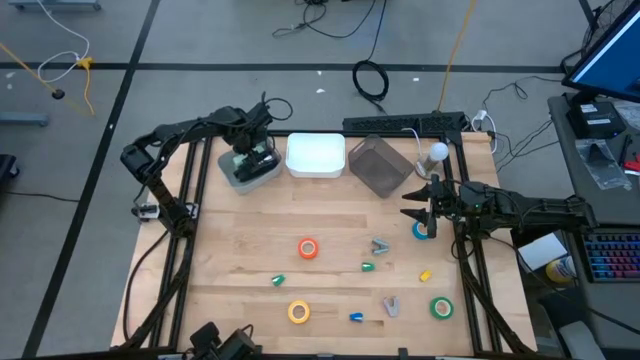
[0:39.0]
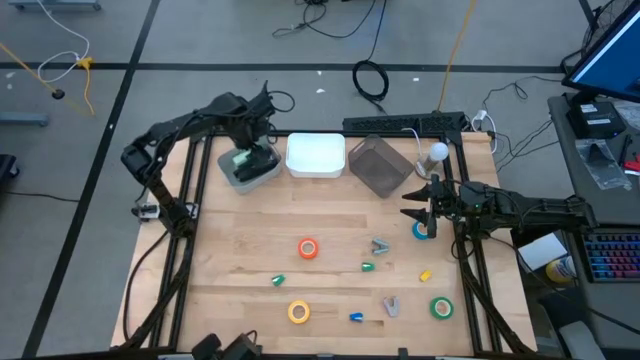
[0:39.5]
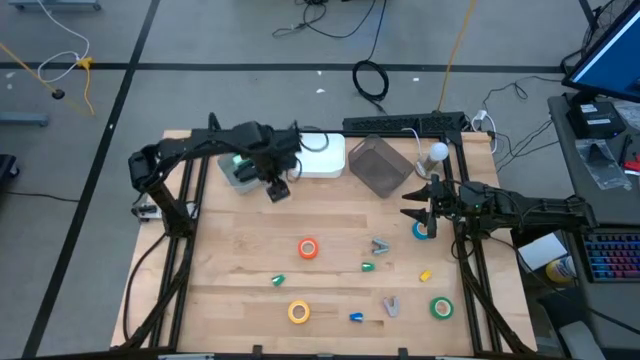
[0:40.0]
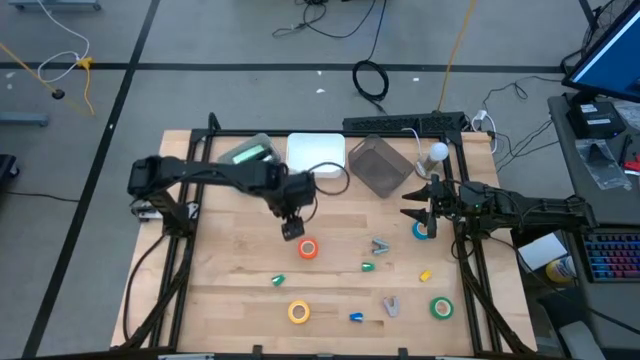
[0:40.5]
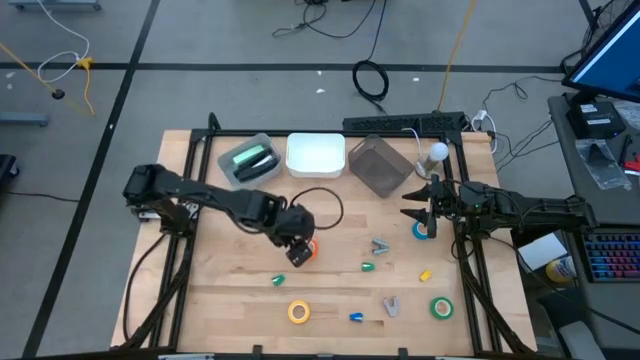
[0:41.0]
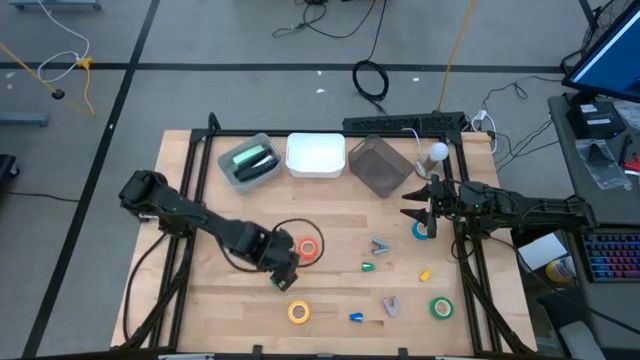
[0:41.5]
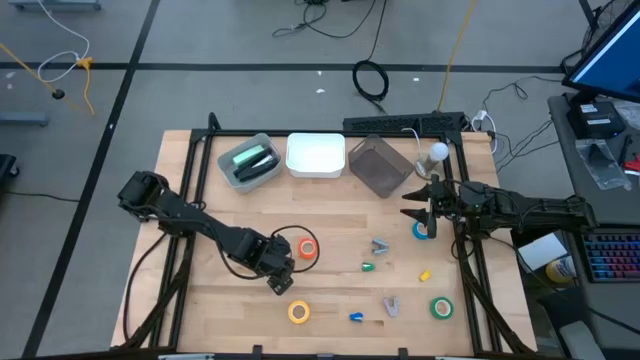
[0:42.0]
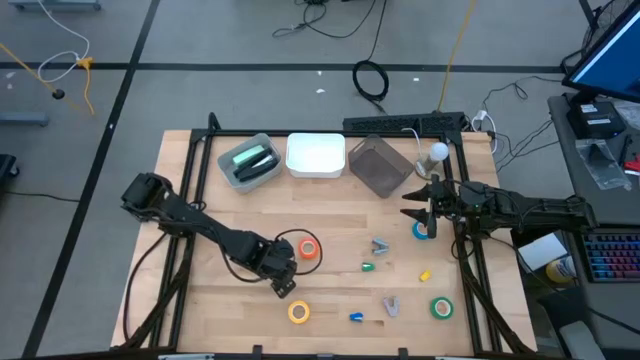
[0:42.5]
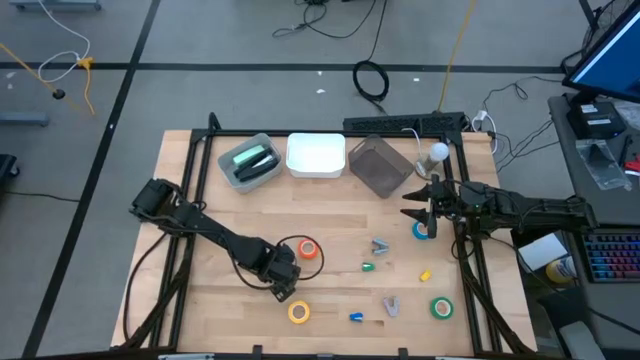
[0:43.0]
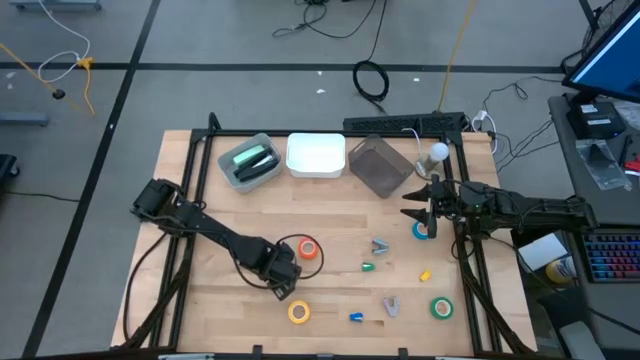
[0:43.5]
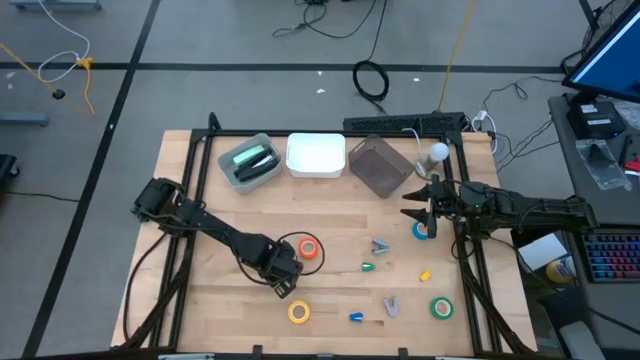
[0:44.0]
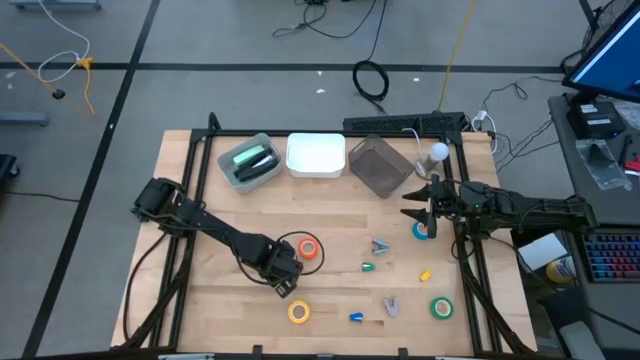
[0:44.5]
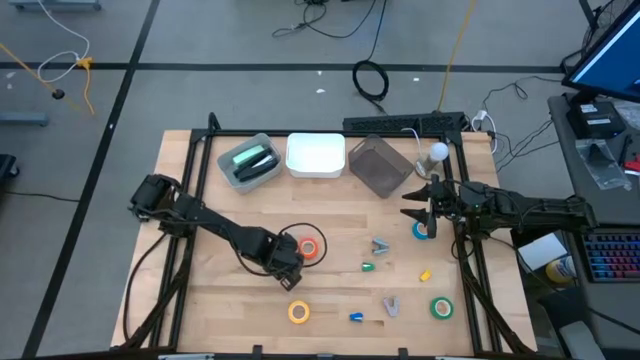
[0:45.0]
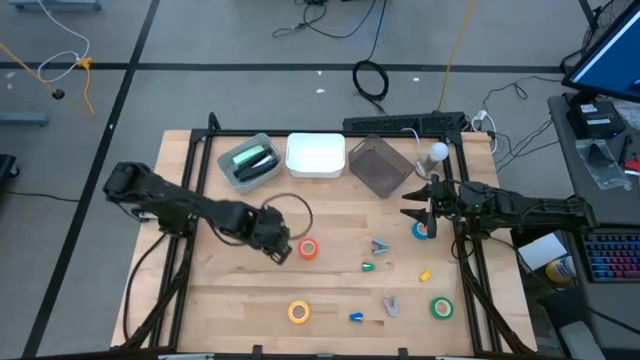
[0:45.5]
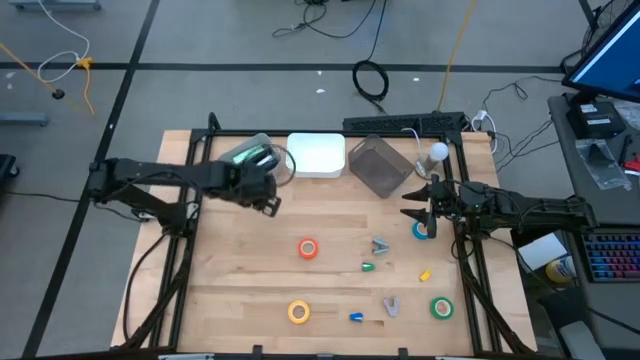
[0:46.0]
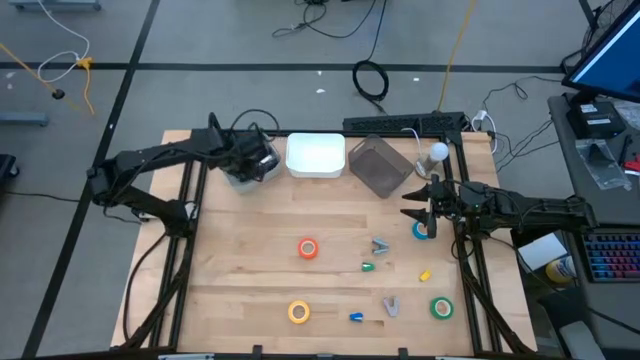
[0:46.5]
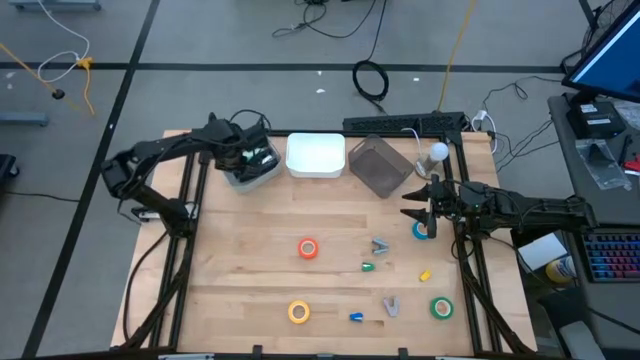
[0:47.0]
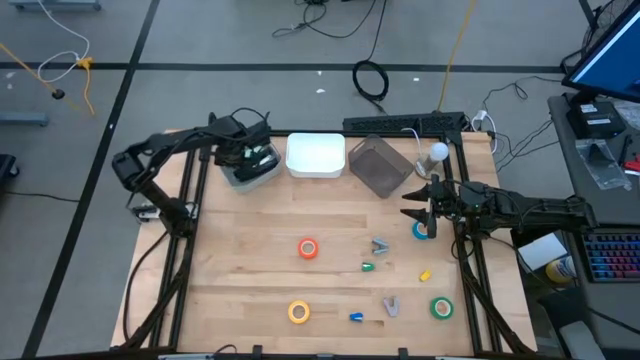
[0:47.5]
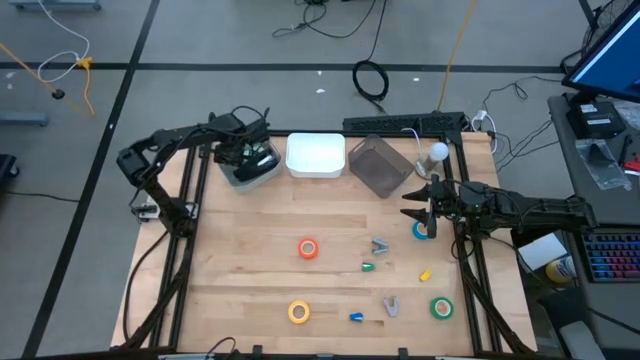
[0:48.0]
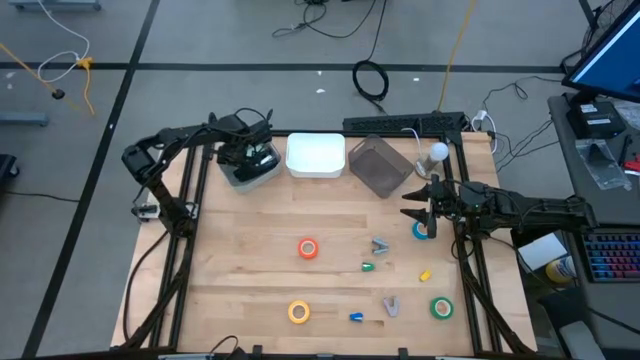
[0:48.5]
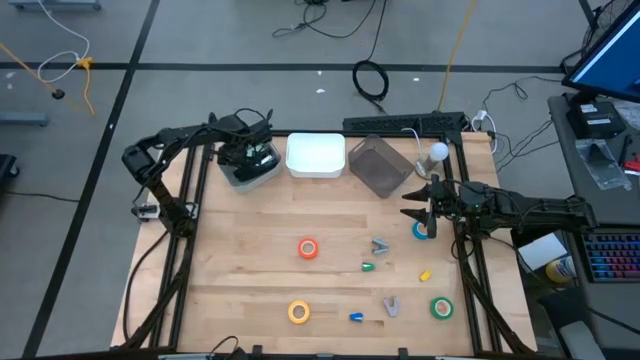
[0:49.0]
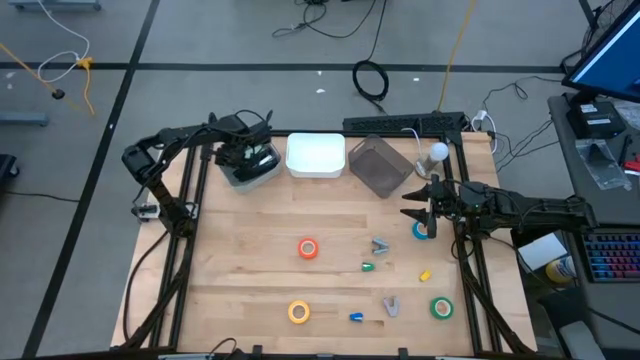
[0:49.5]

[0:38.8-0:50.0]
Task: Pick and place Stapler, Stapler remover, tape
Put the left green stapler into the gray bin

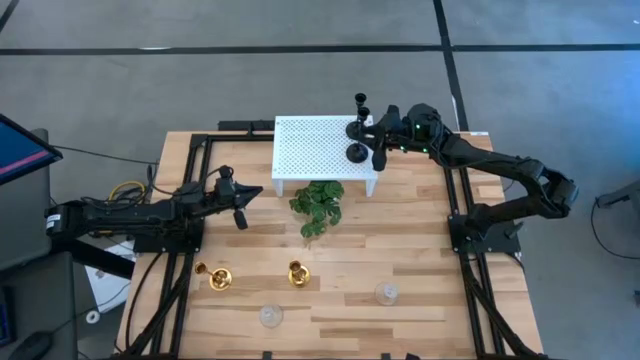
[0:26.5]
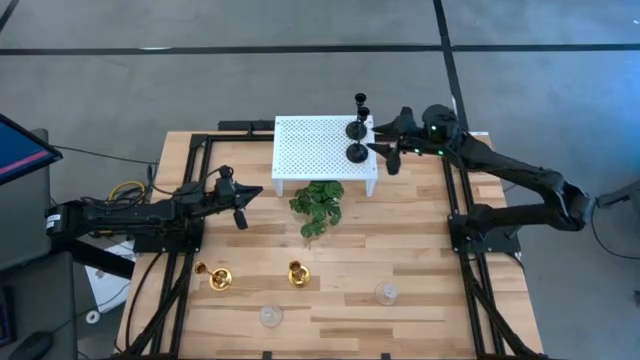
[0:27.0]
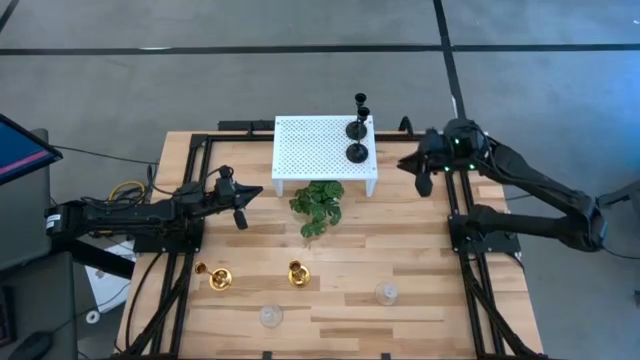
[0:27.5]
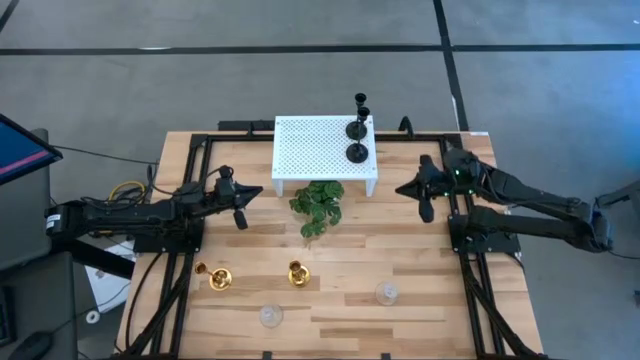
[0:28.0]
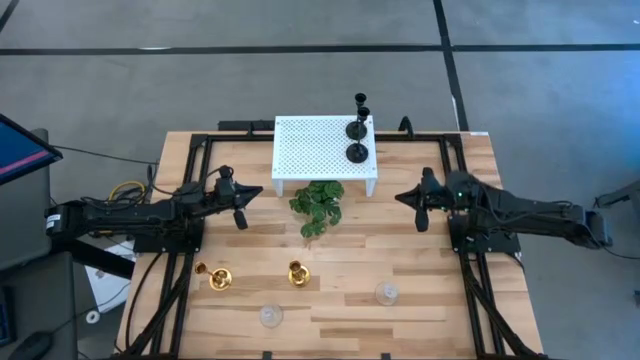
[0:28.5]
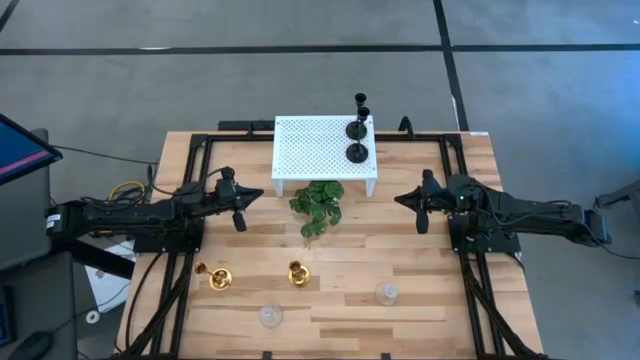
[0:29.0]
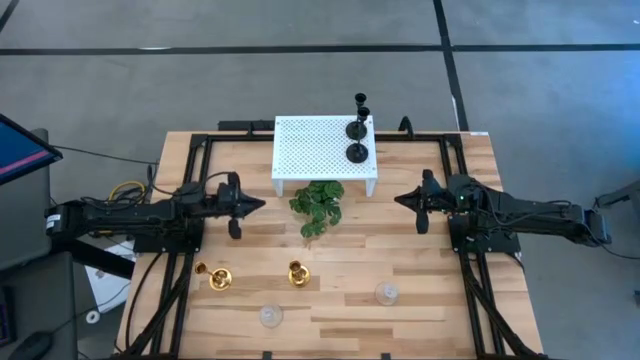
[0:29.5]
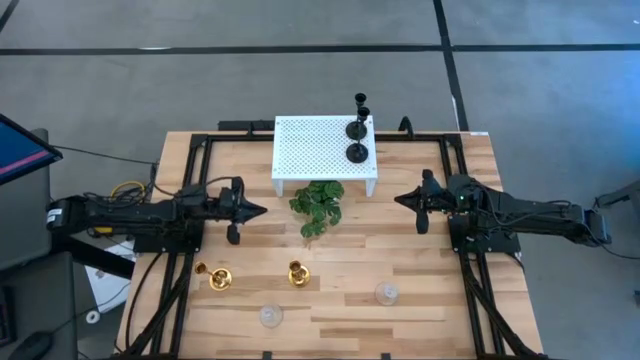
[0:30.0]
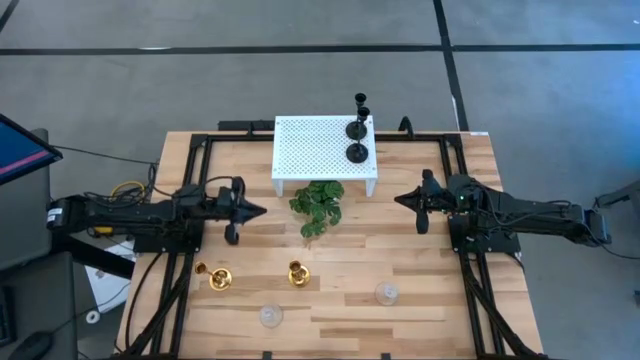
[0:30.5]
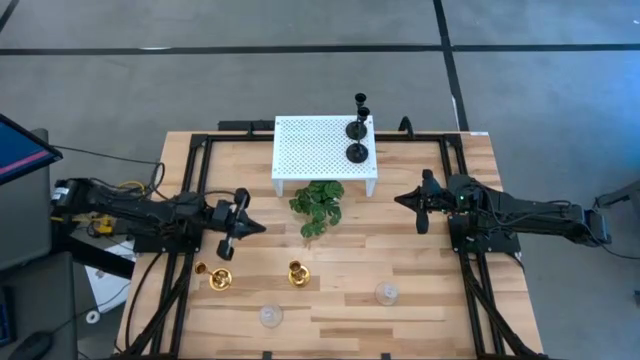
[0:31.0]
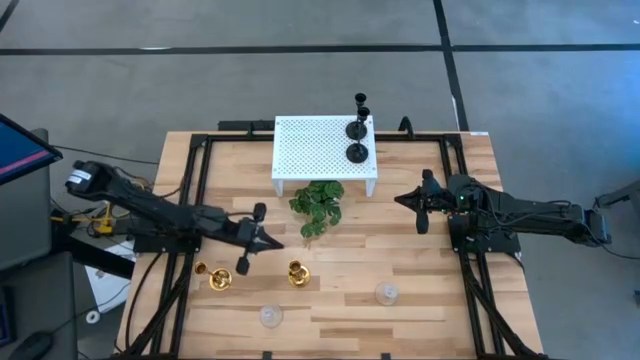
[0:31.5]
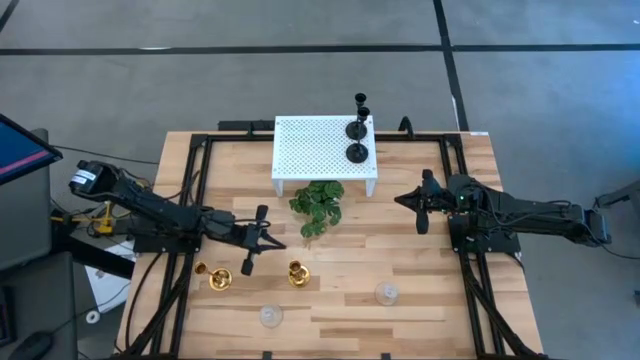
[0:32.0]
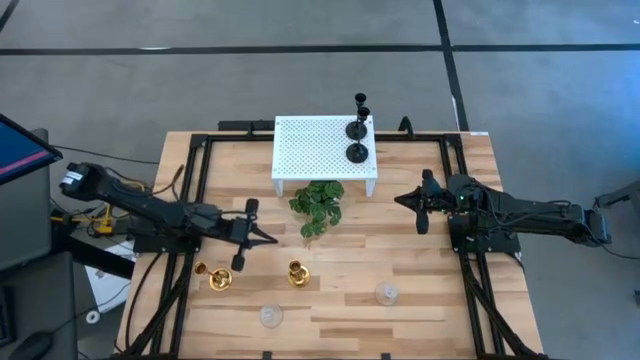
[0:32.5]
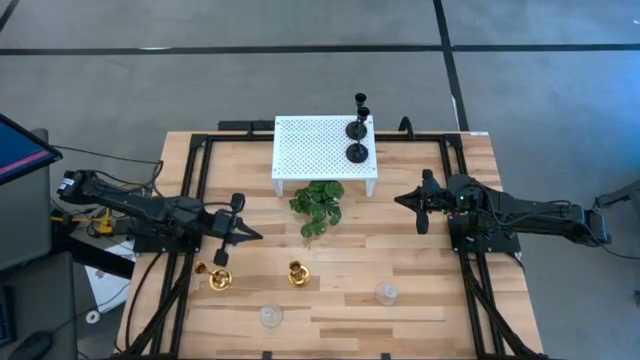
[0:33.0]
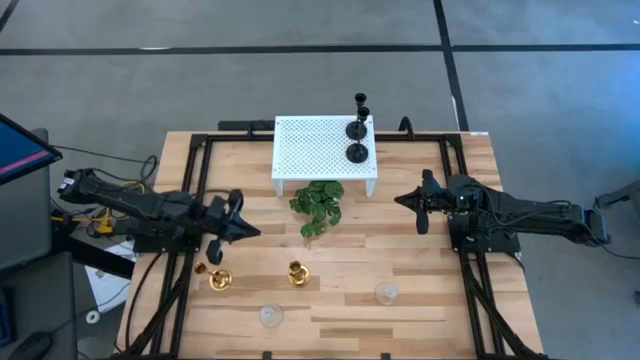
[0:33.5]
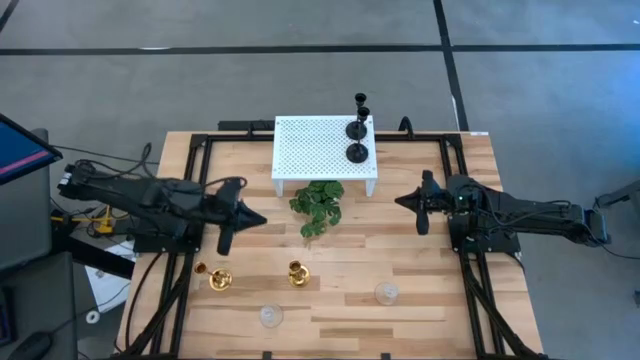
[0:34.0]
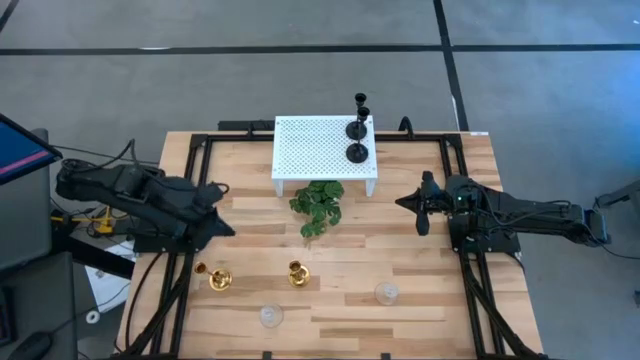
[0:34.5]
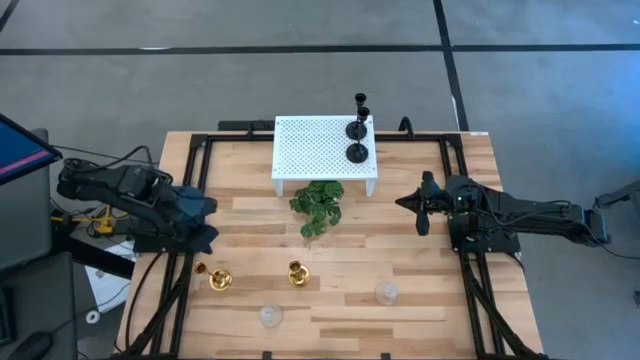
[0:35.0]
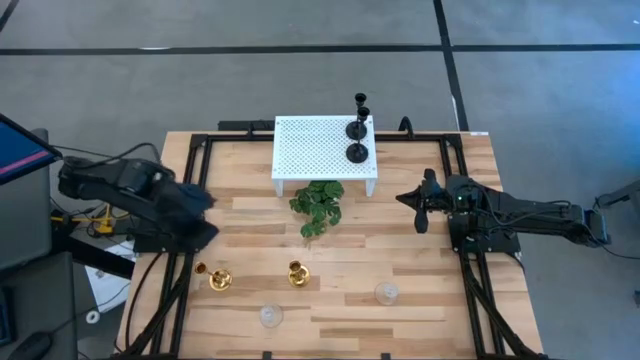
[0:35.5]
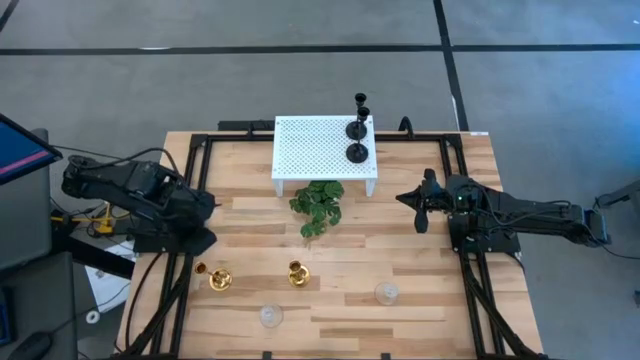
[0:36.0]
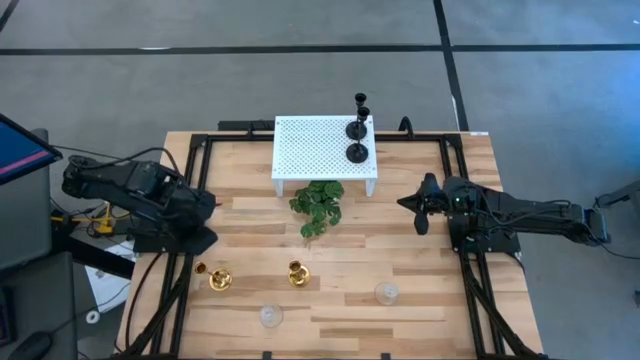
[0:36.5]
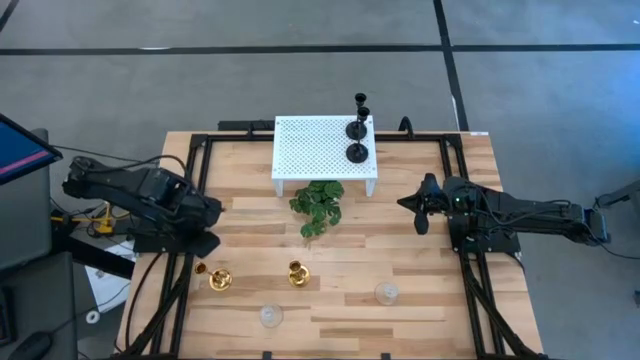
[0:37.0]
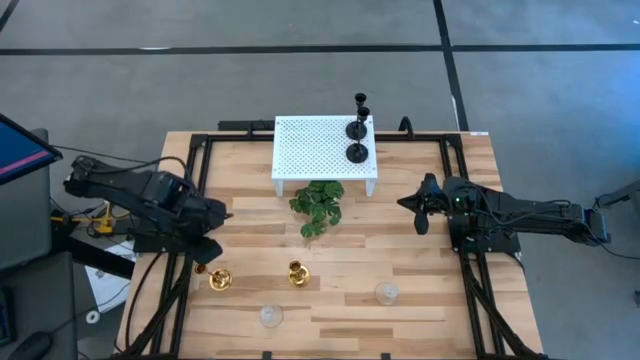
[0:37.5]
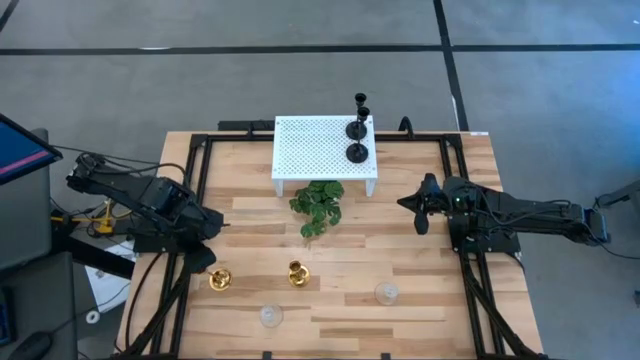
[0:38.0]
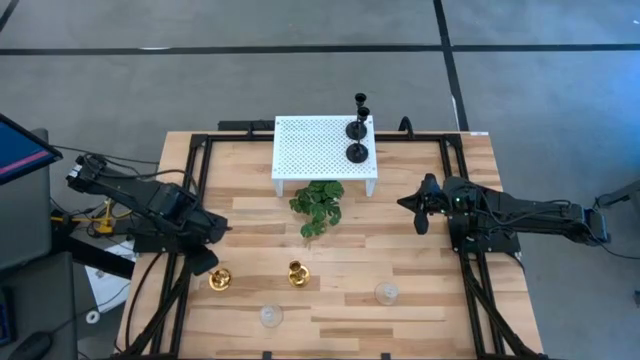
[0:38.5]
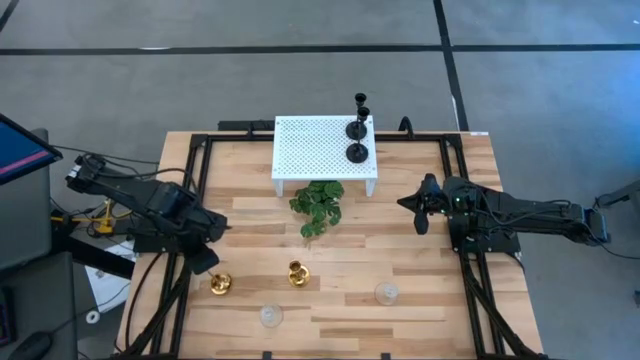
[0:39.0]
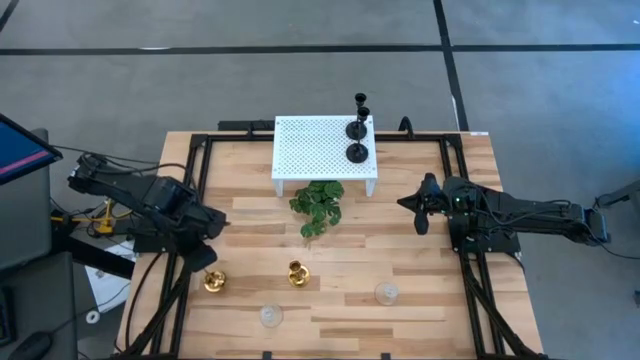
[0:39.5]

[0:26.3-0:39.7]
Task: Pick & Place candle stick holders
Put the left gold candle holder on the shelf
